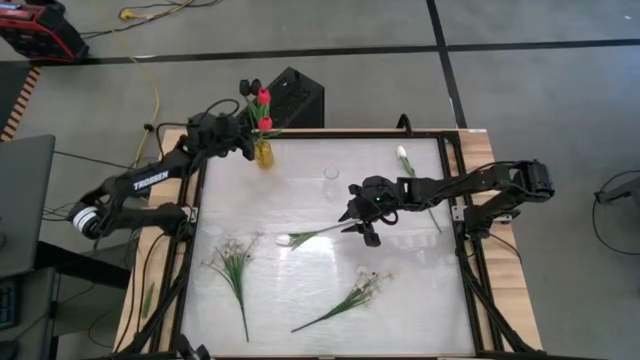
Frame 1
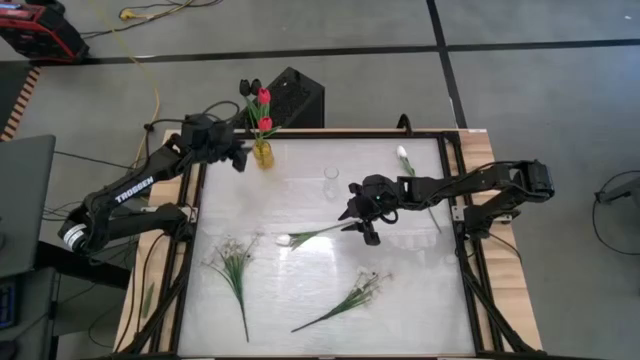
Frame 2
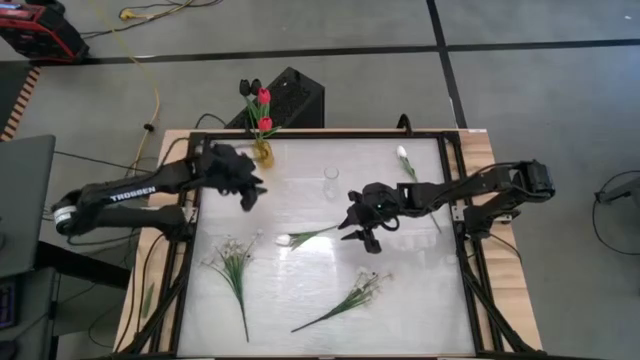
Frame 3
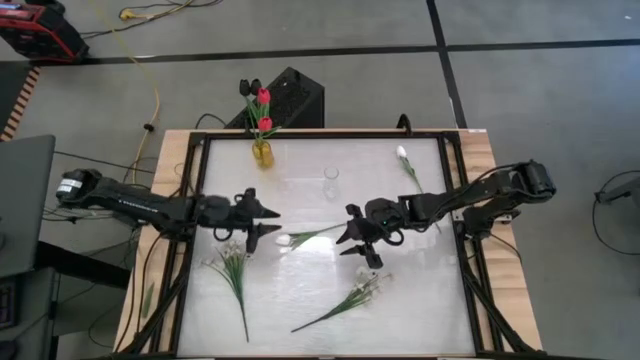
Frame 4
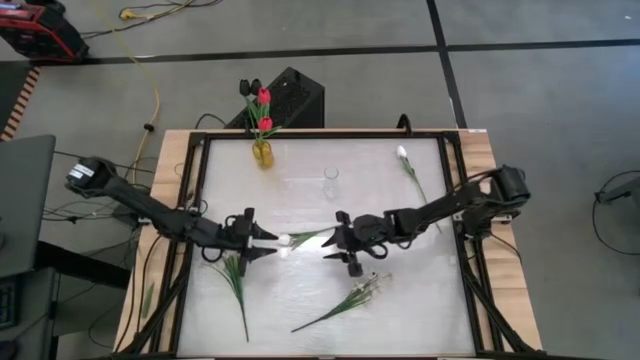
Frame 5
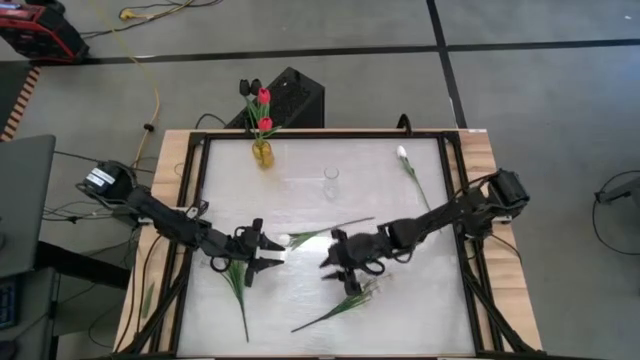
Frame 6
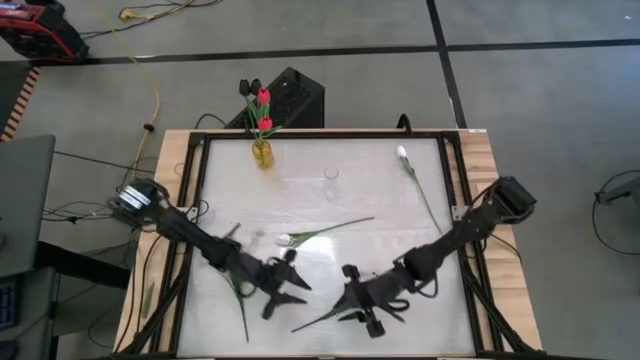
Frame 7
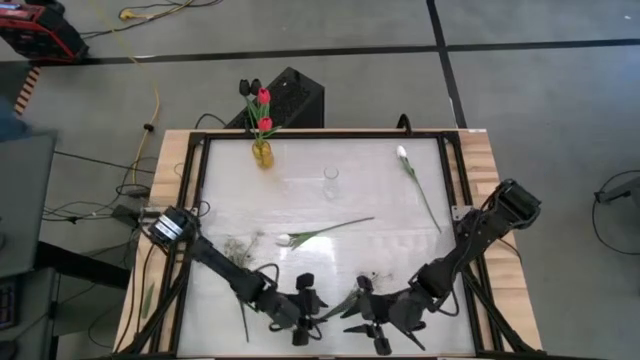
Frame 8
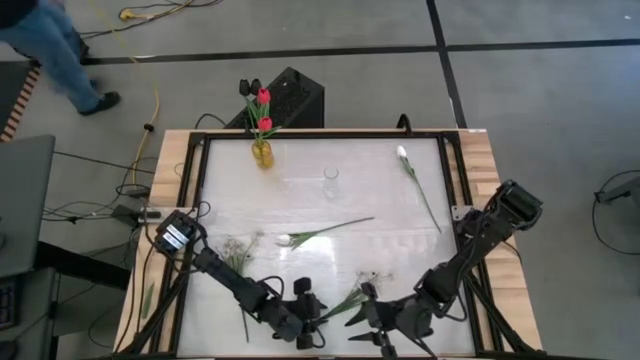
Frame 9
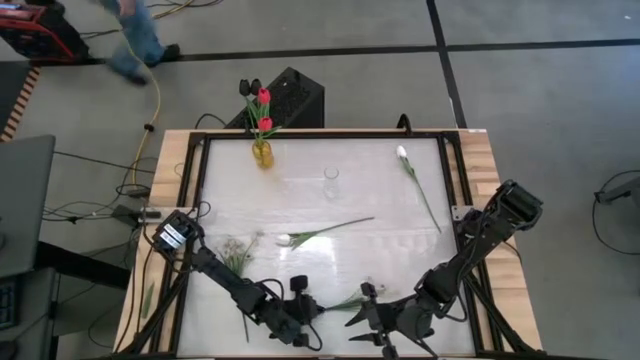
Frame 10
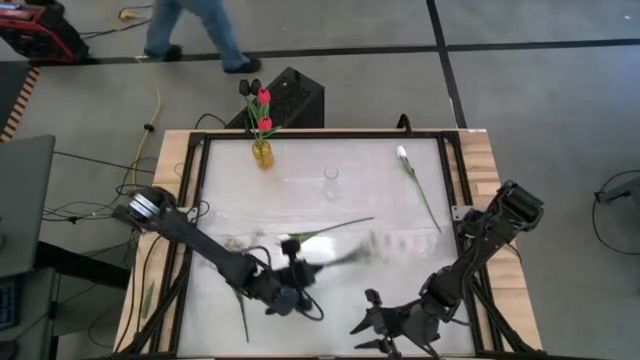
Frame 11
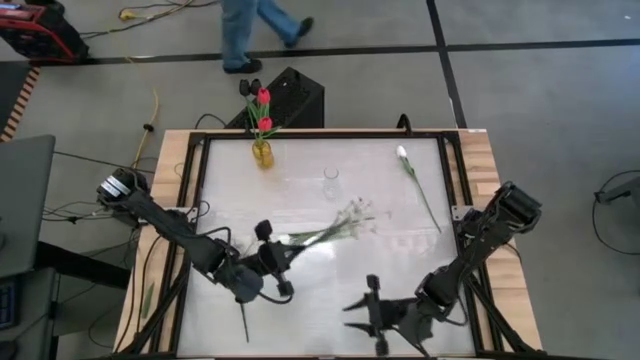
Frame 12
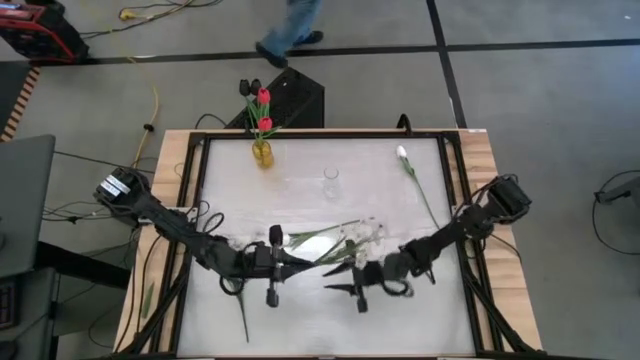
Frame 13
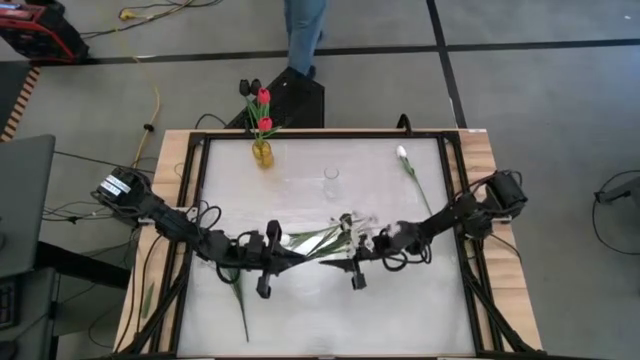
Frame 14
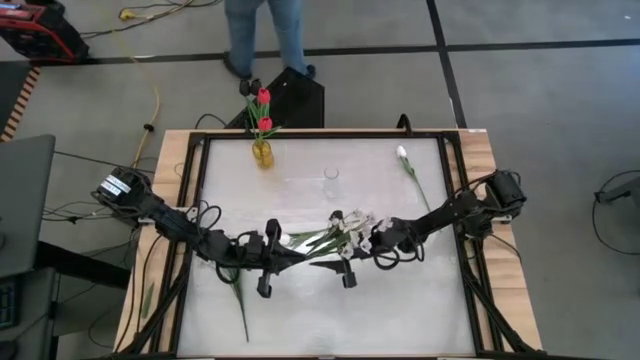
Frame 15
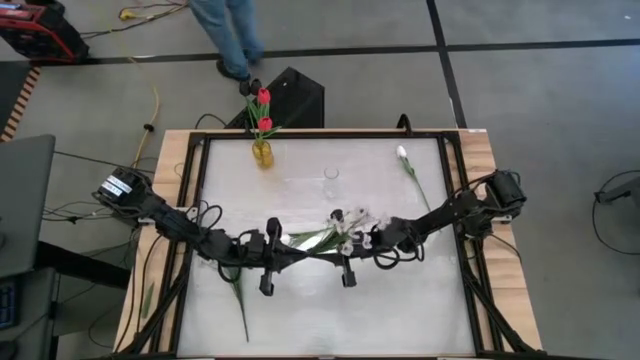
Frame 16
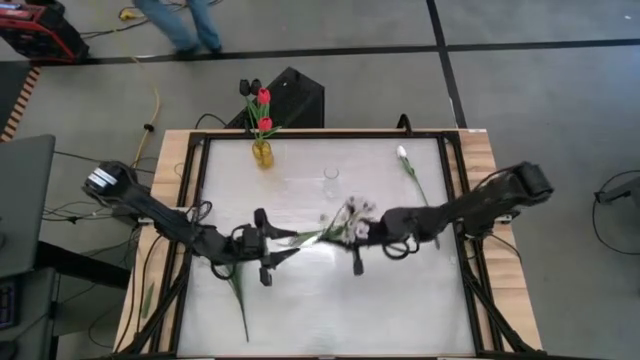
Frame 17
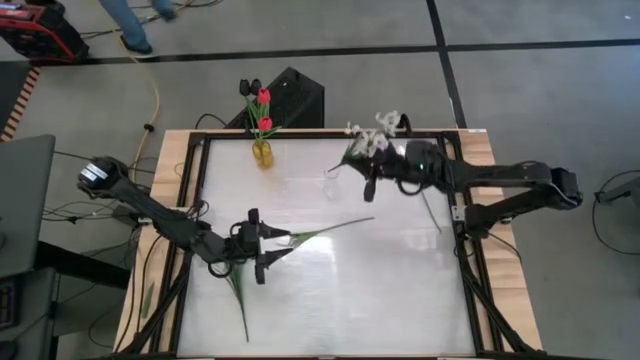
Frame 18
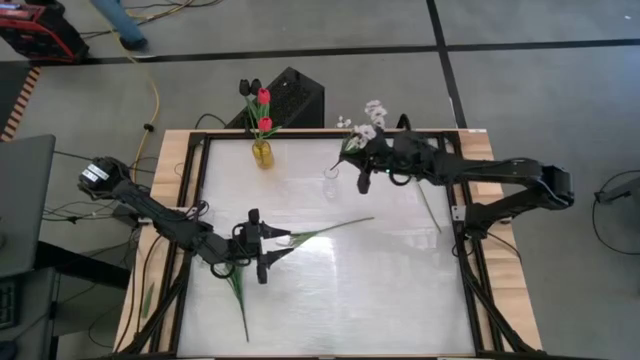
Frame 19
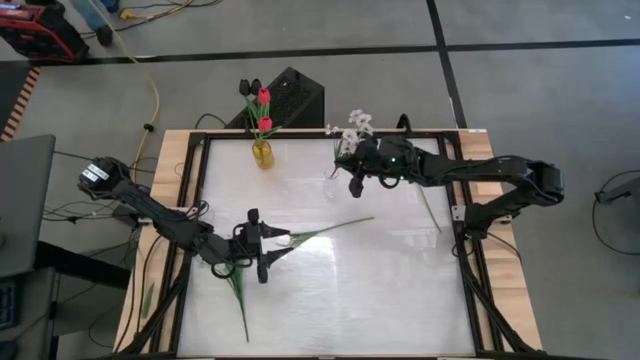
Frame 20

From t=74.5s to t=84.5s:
Task: Sort flowers into vase by color
Put the bottom right white flowers into the transparent flower vase

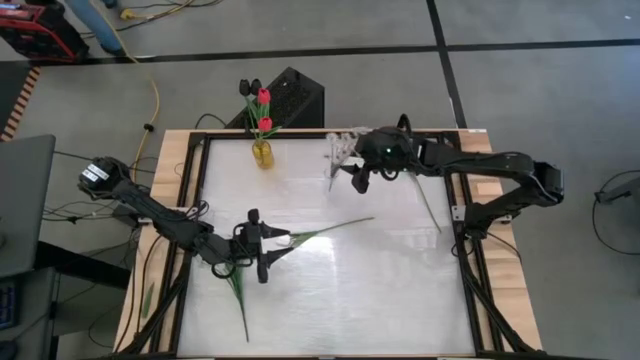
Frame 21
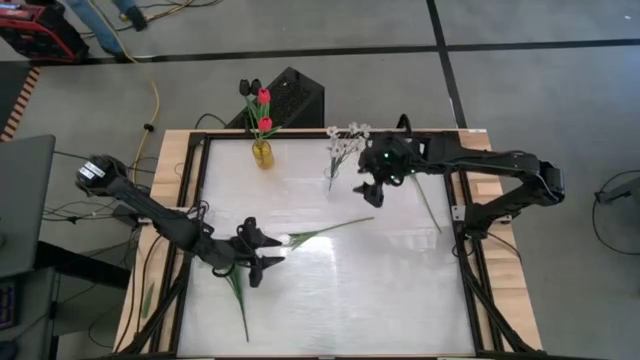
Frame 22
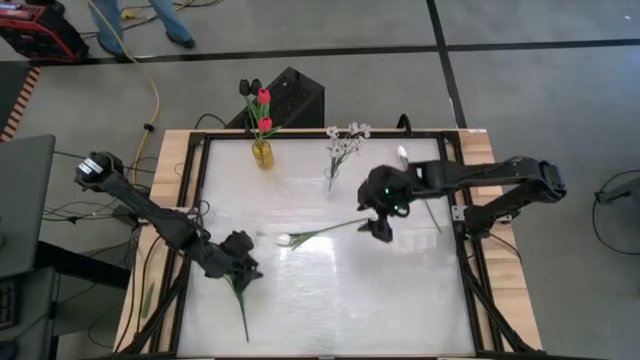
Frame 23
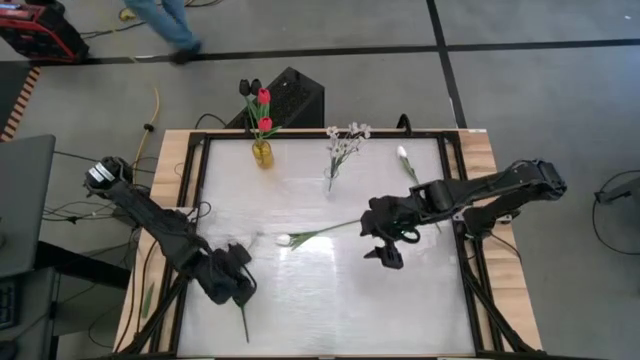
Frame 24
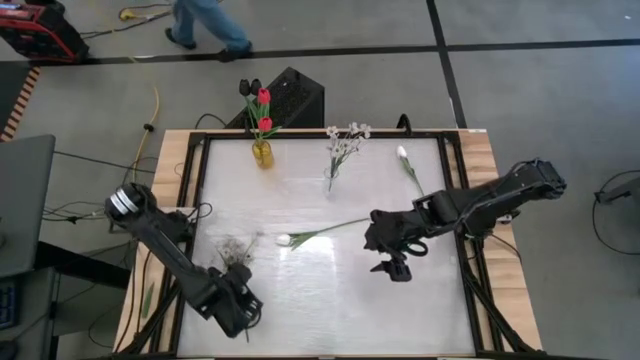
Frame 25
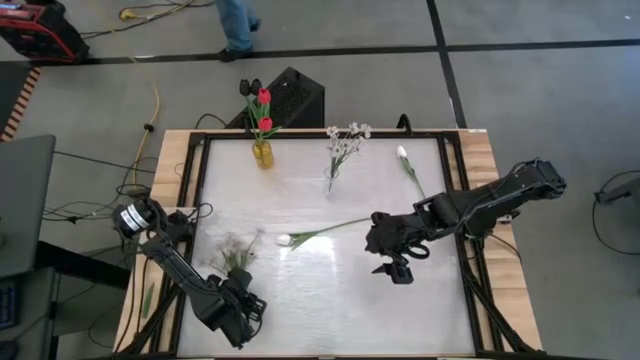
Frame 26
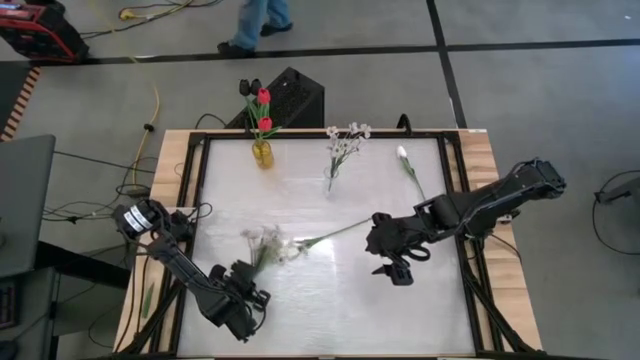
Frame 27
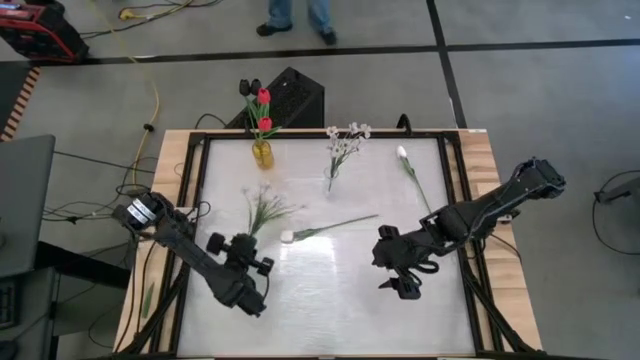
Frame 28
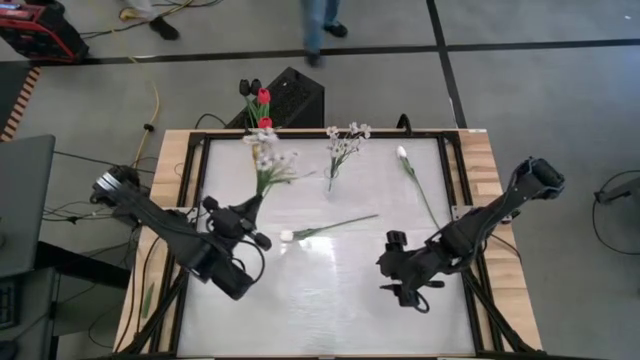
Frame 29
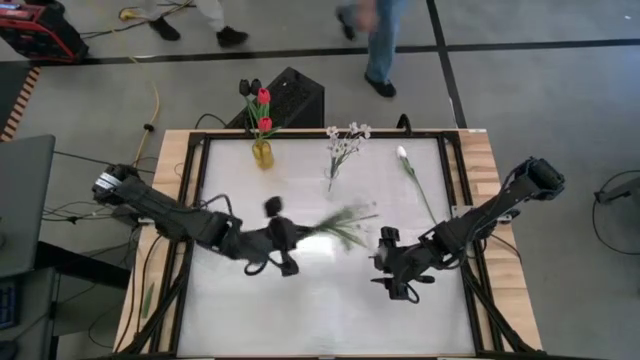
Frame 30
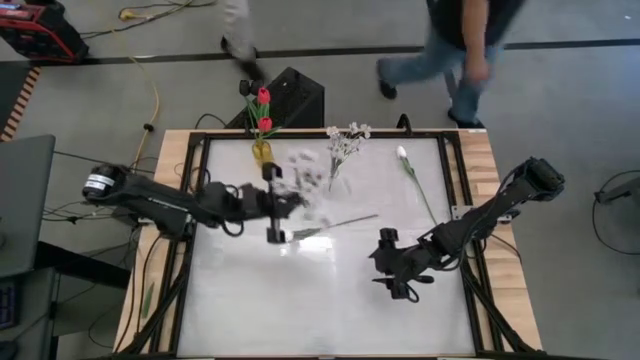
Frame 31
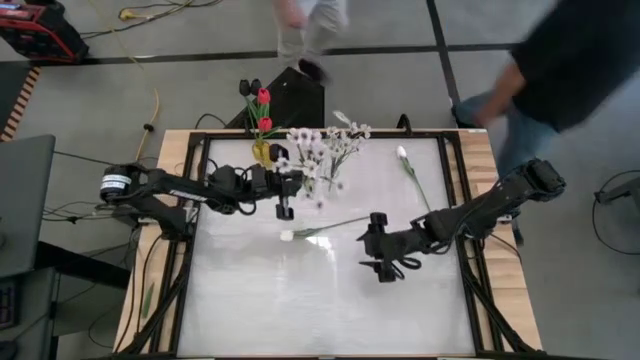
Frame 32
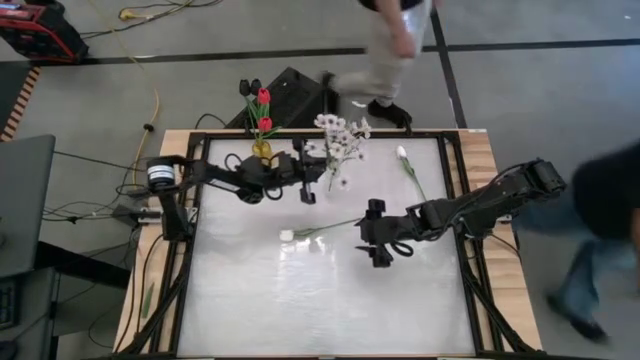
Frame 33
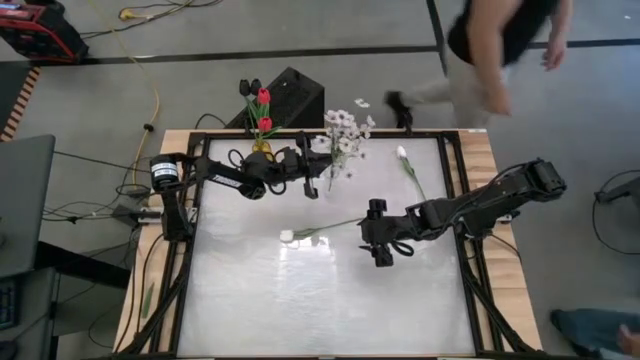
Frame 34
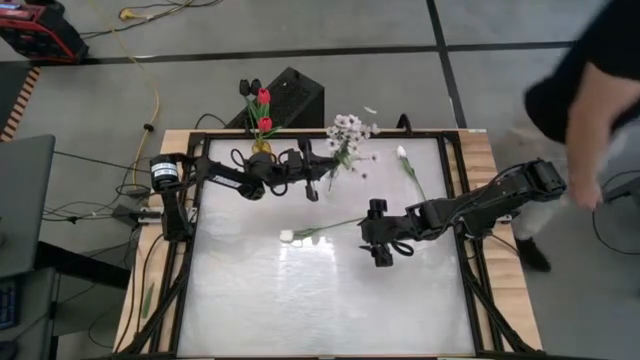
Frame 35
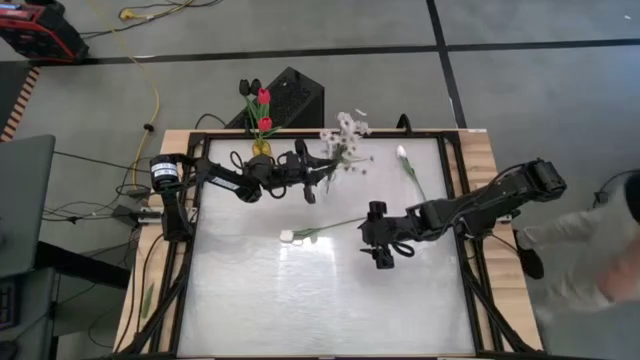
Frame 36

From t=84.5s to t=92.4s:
Put the left white flowers into the transparent flower vase

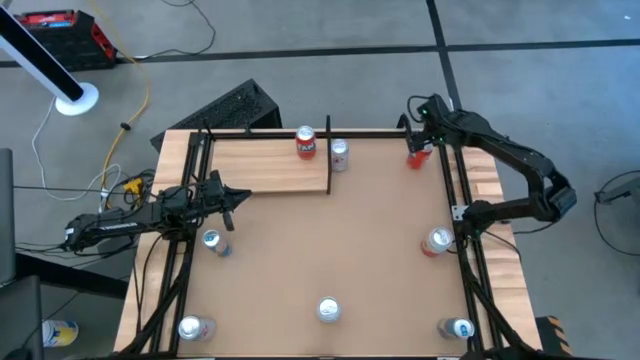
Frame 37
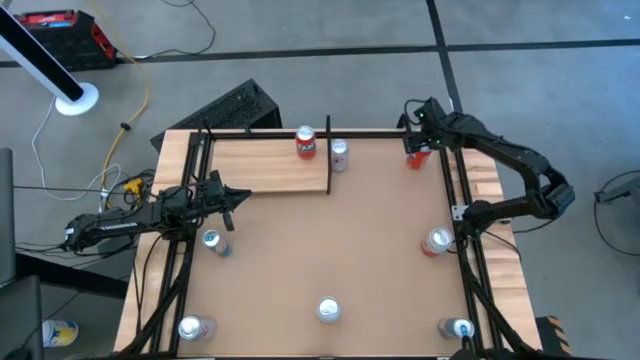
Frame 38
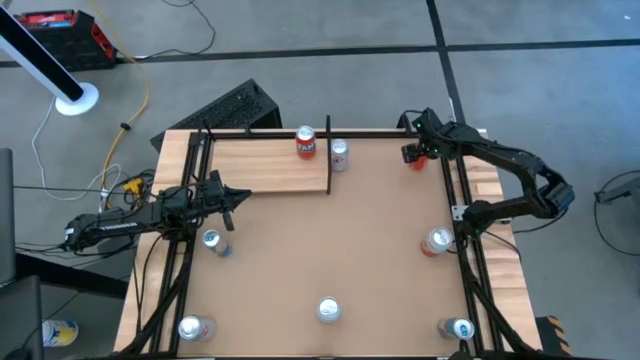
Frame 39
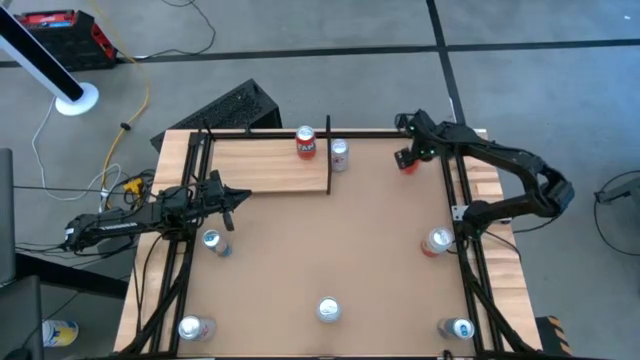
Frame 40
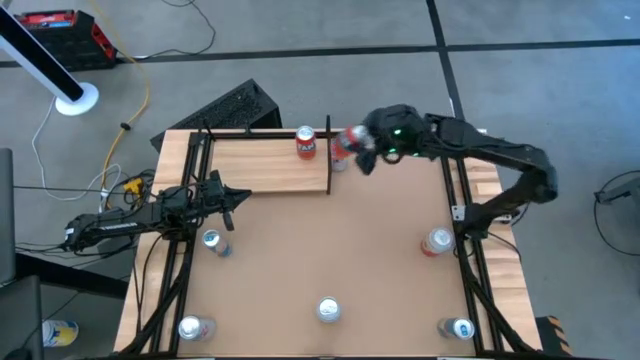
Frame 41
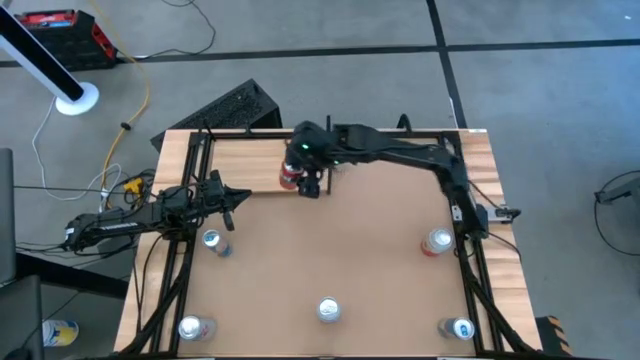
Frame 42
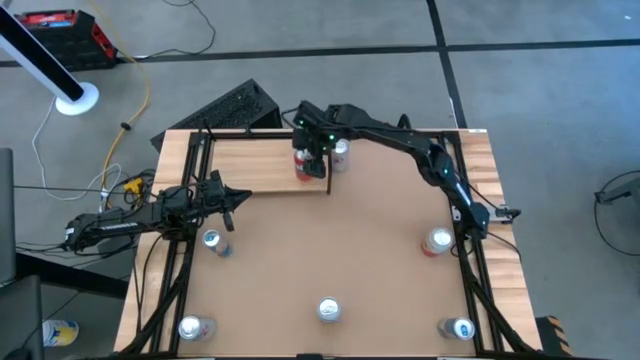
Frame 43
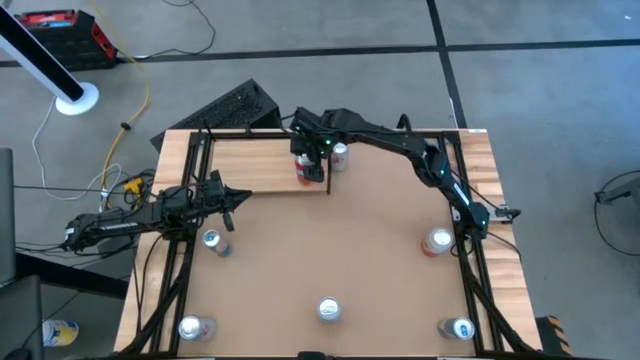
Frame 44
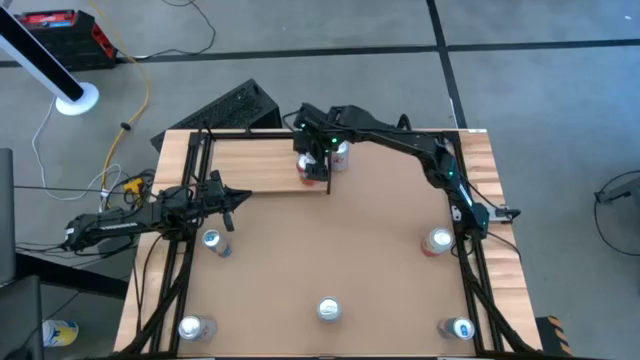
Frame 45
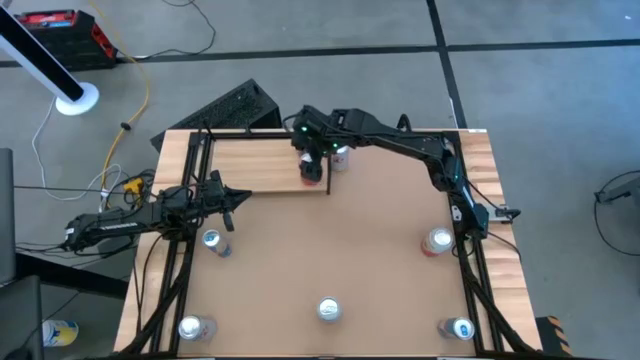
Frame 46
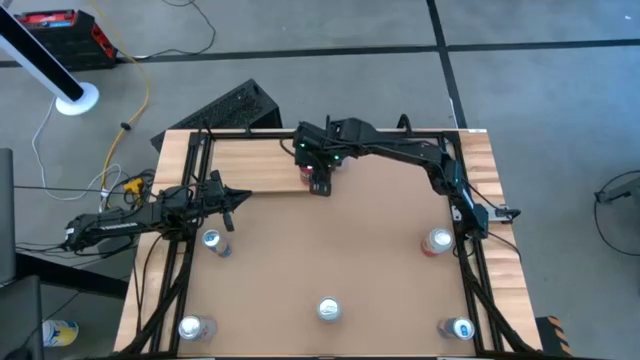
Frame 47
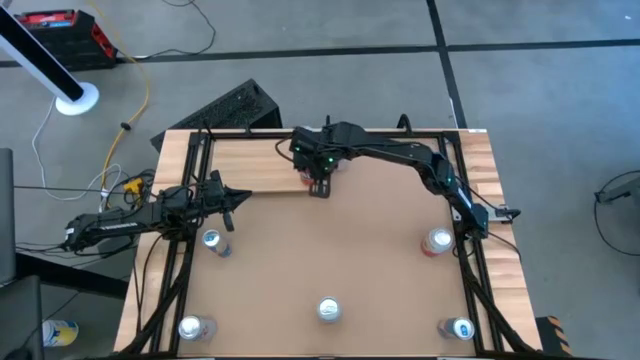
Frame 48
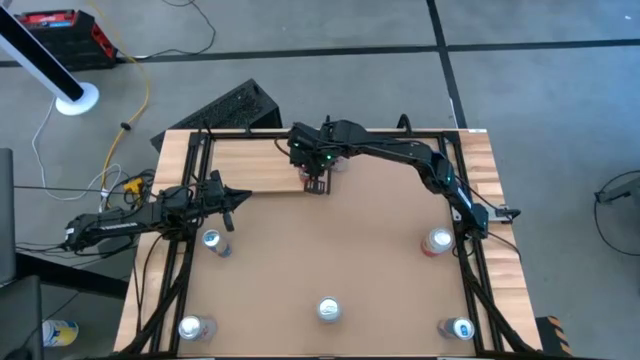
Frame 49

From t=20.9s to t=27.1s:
Task: Place canned beverage on shelf
Put the red soda can on the shelf aligned with the other red soda can
